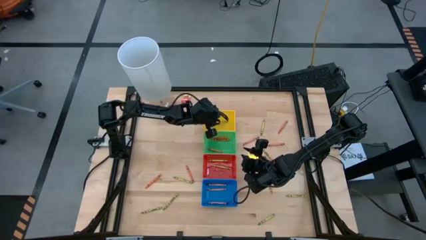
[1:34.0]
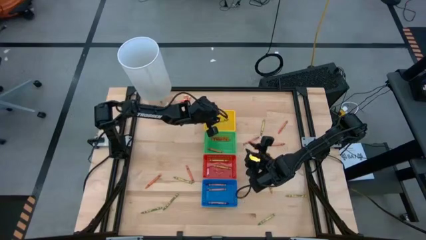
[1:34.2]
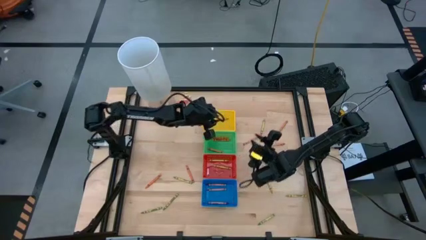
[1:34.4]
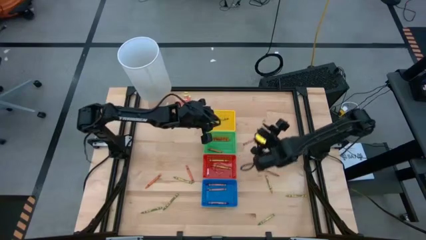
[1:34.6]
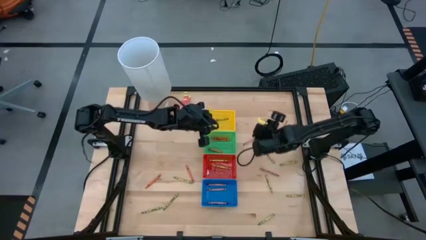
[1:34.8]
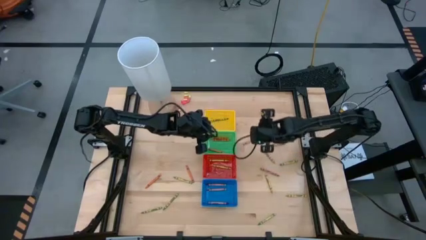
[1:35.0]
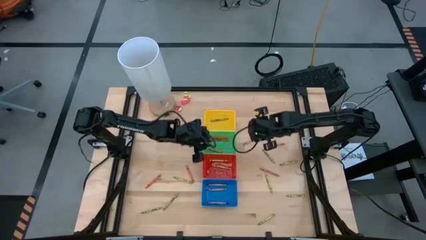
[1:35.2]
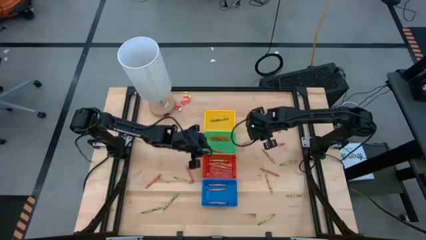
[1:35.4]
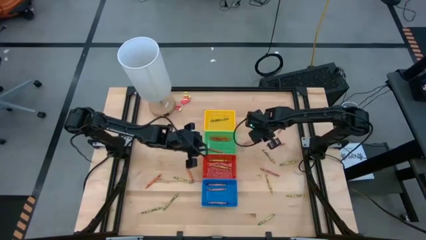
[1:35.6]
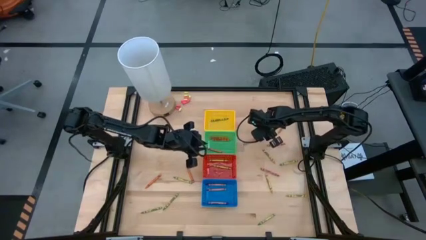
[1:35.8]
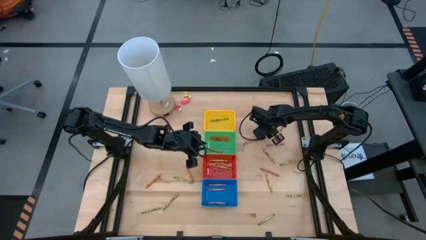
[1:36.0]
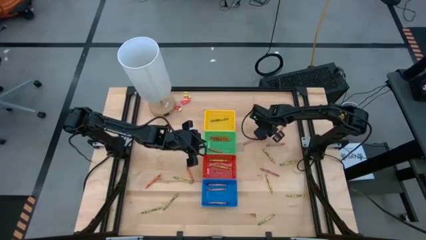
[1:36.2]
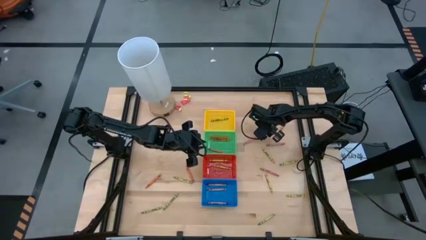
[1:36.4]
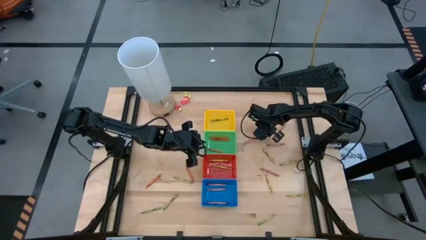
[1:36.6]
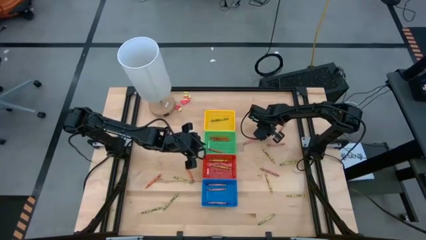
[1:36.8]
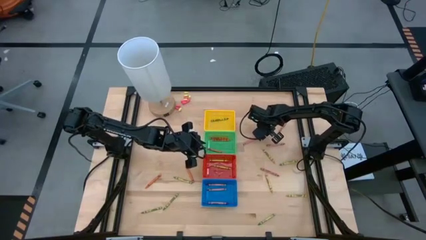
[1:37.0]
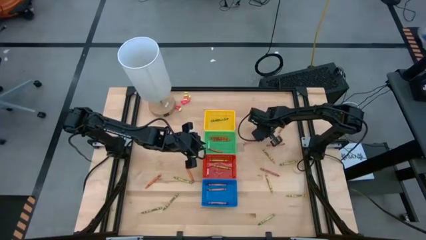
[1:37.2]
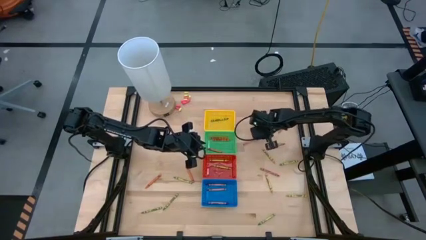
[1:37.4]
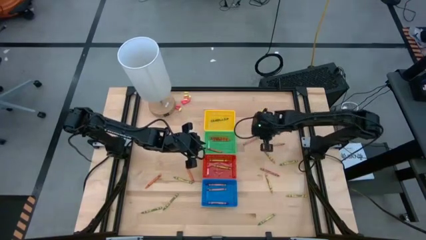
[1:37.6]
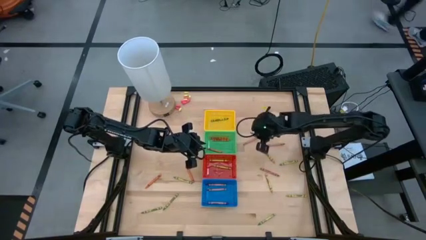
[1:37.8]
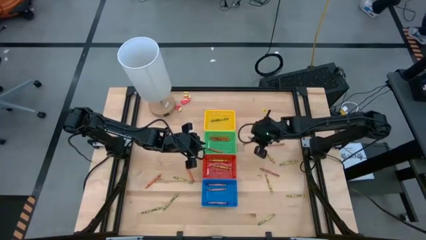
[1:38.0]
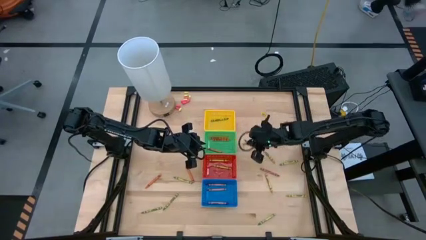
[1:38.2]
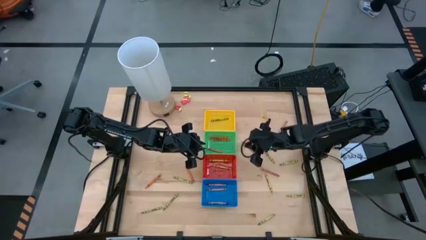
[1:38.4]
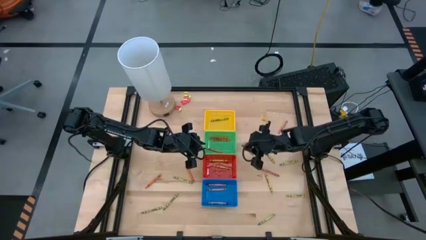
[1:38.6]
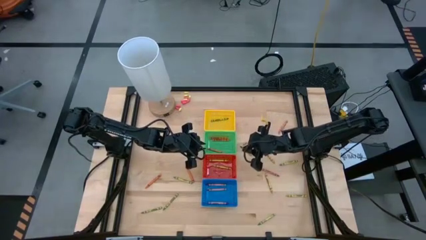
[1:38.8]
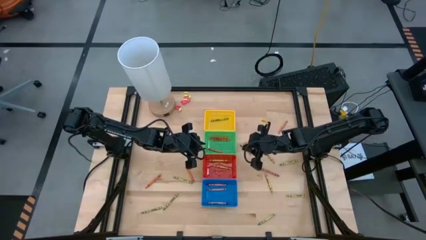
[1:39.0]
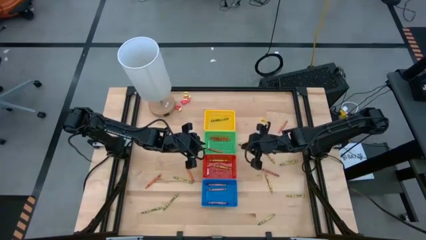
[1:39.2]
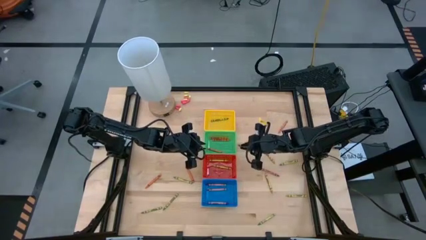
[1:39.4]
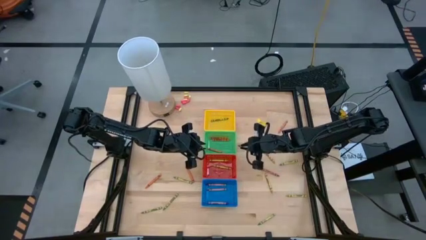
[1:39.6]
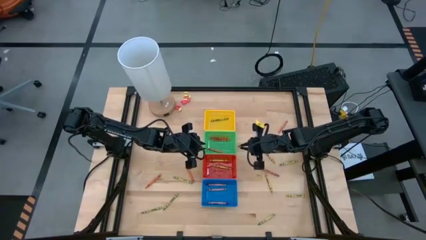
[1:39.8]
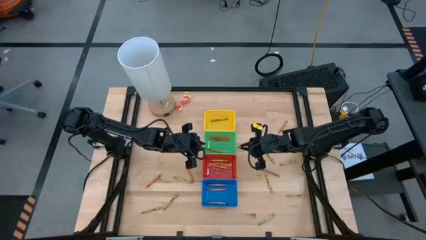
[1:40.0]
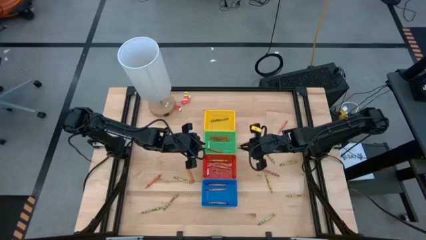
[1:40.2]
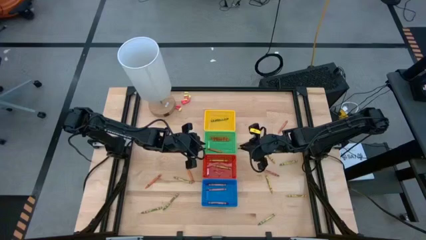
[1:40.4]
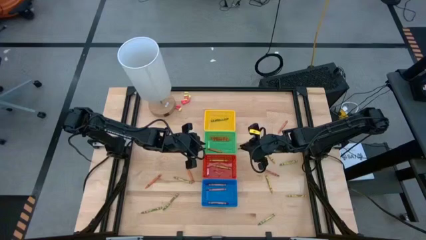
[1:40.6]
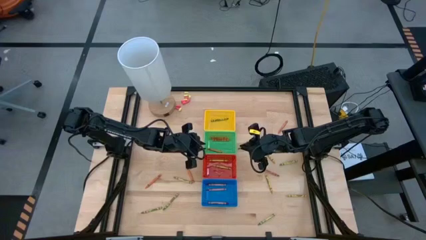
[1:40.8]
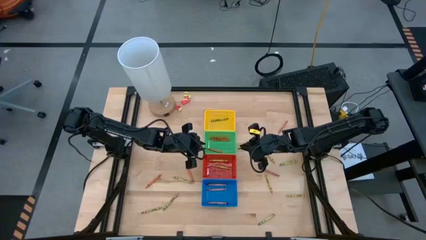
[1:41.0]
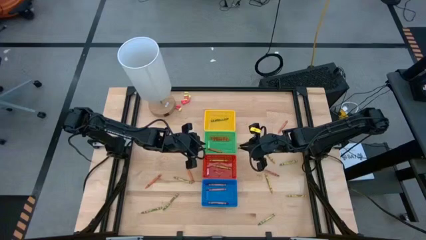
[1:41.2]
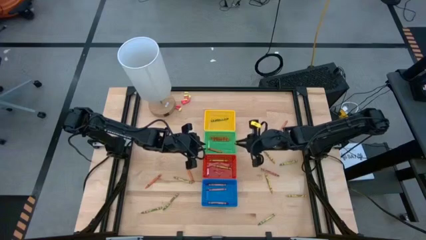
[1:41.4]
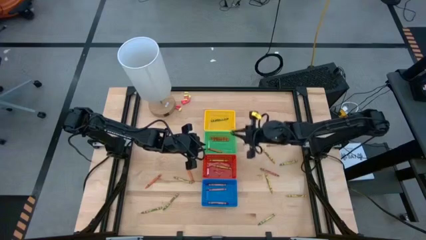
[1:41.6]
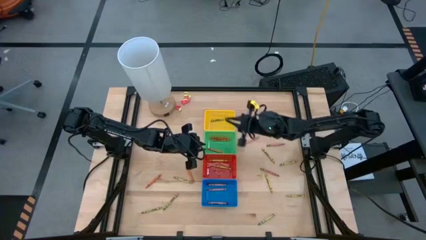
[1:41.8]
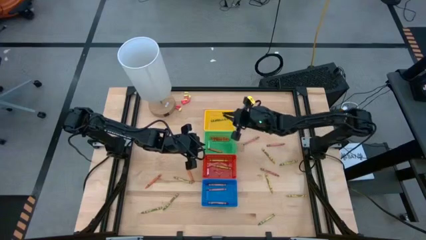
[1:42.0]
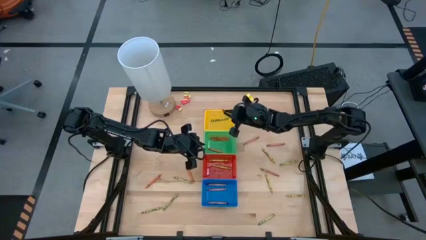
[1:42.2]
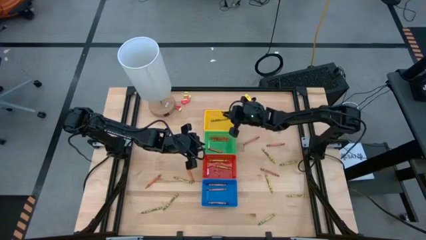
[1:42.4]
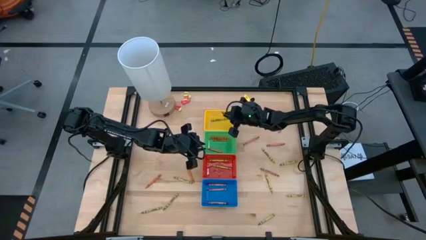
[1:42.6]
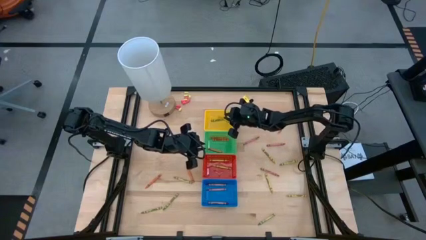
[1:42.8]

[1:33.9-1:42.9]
Task: Sort crayons
Put the green crayon into the yellow bin

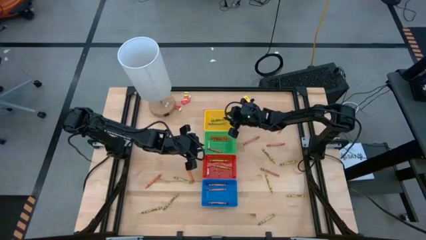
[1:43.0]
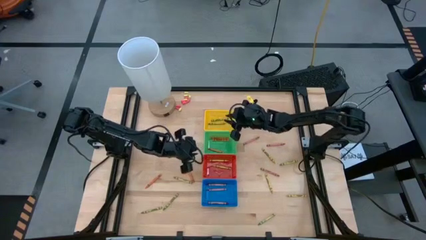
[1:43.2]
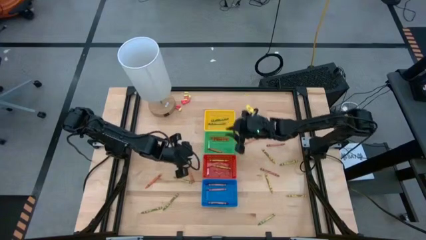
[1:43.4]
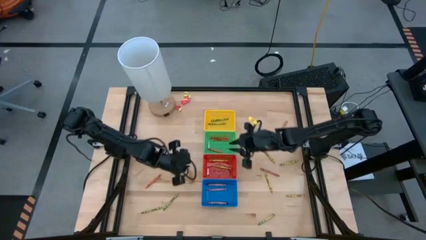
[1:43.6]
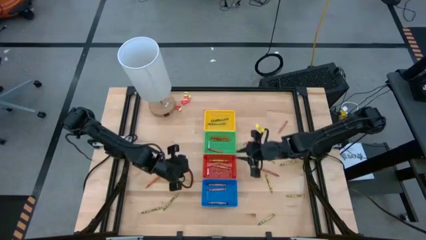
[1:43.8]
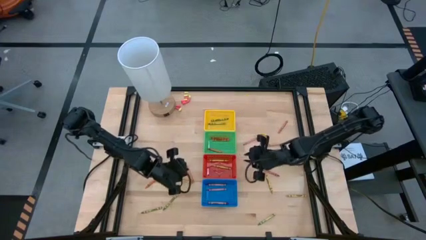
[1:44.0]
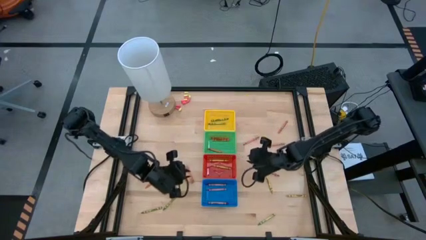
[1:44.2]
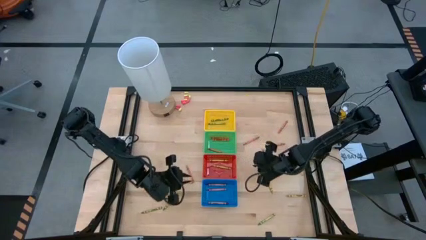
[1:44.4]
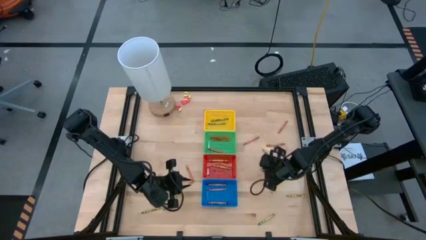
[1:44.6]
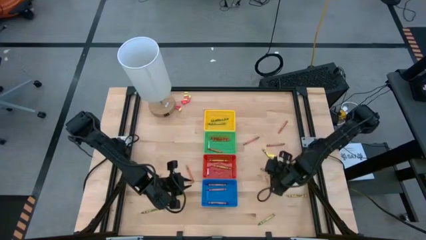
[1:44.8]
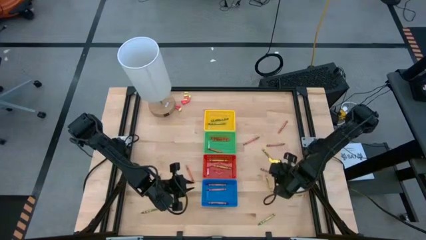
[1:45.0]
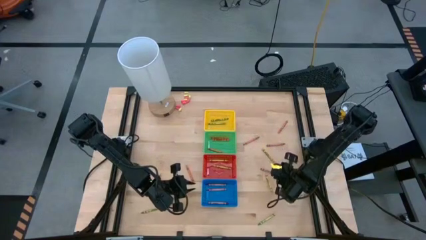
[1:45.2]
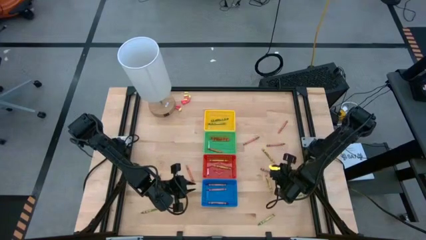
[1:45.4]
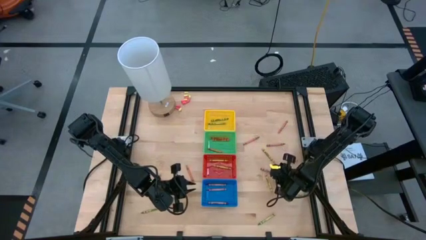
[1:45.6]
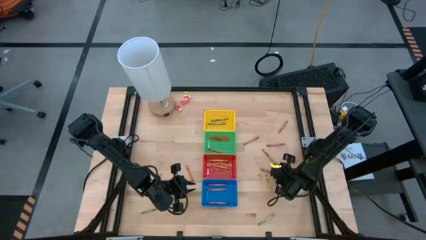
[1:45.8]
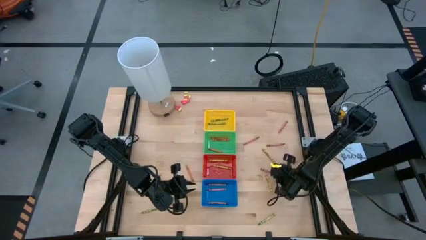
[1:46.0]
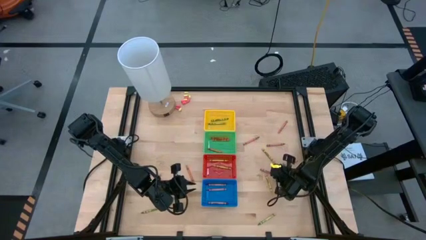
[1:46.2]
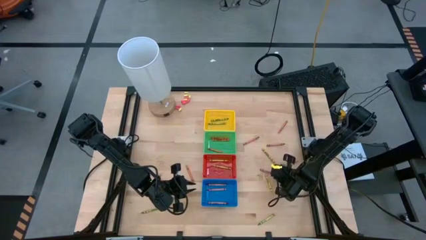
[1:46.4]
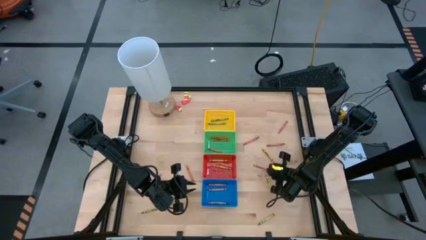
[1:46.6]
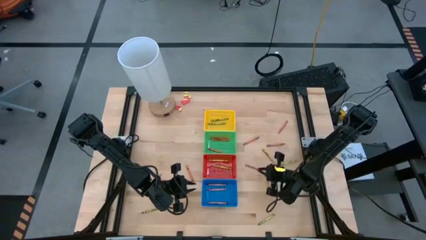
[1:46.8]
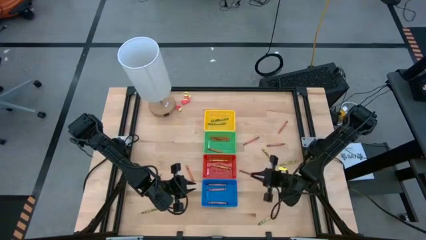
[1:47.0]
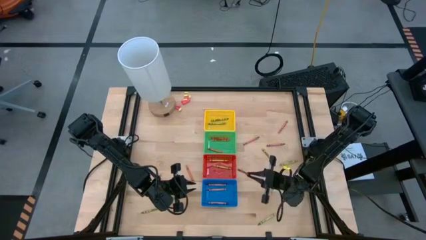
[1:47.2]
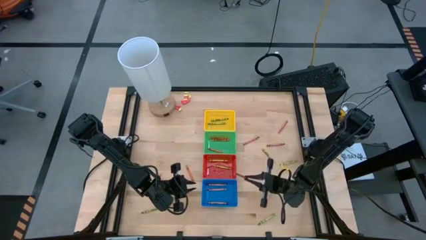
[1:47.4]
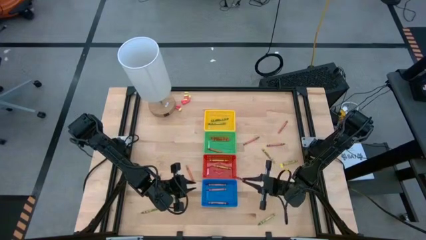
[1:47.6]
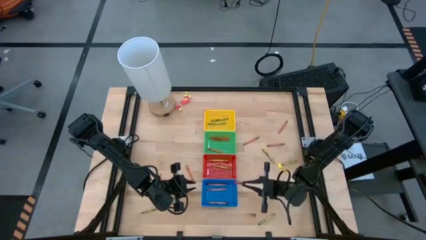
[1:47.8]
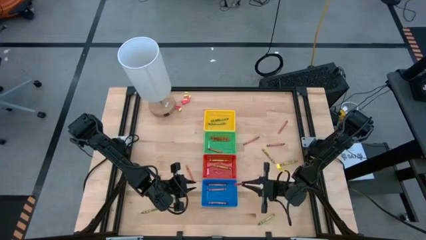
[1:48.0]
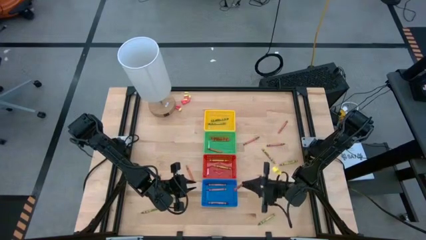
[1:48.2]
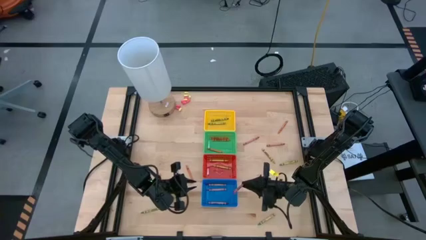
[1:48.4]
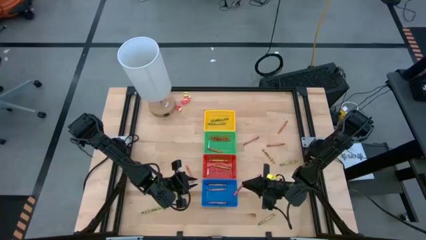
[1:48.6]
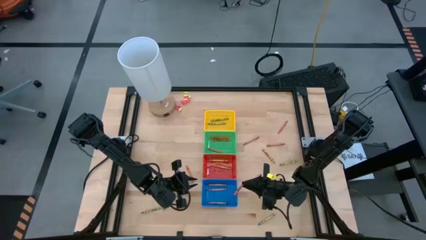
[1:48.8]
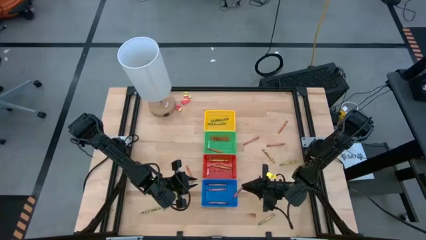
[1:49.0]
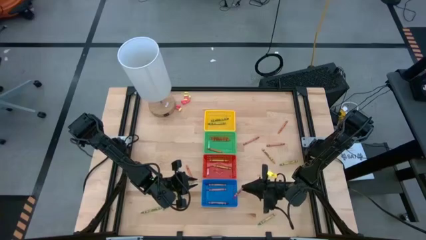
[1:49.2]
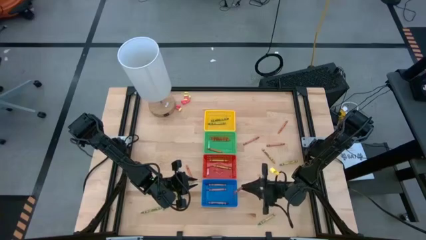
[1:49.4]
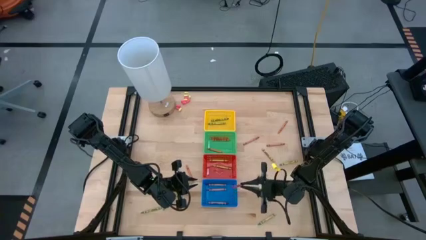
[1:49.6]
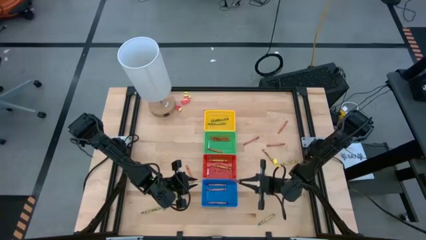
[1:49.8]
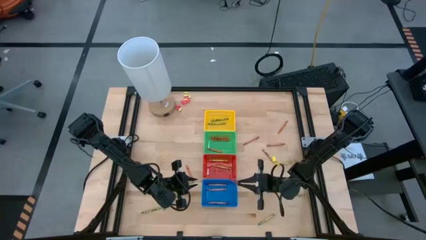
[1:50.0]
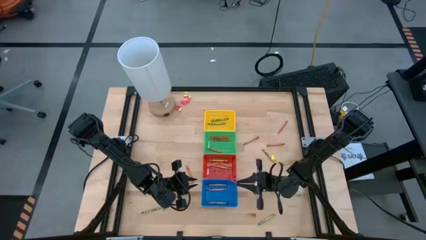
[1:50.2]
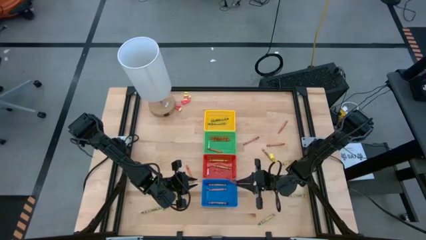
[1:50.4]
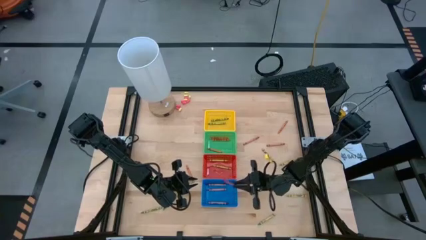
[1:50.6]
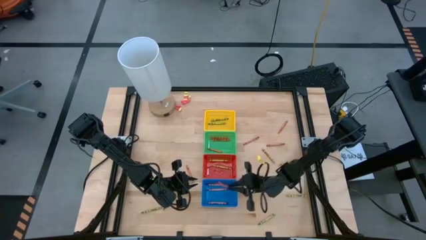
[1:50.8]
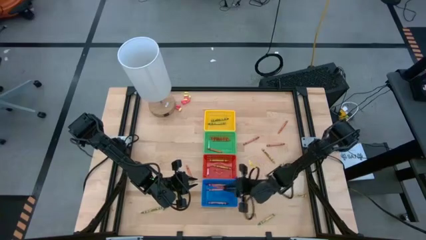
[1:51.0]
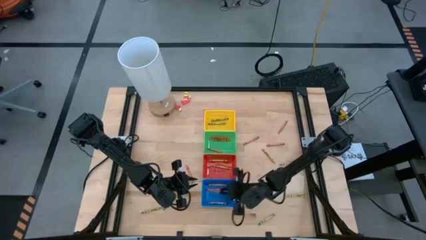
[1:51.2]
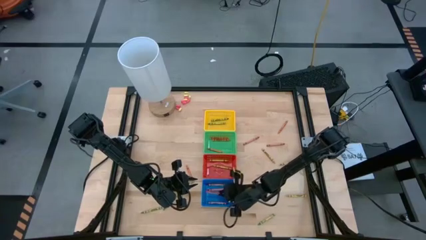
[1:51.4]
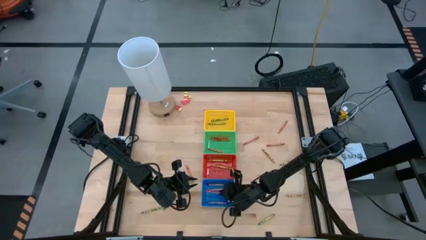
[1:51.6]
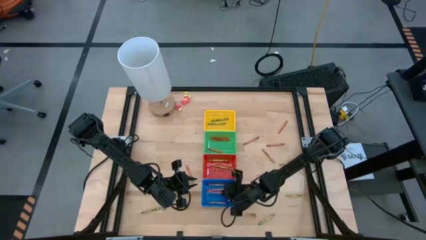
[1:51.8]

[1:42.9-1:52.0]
Put the red crayon into the blue bin
